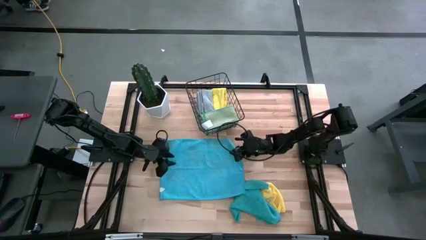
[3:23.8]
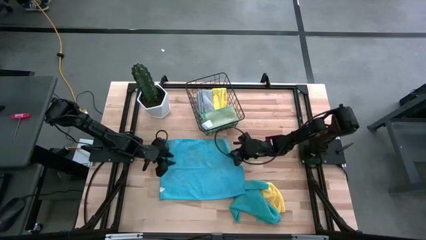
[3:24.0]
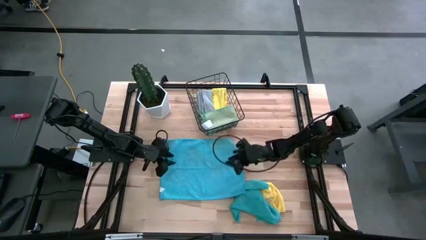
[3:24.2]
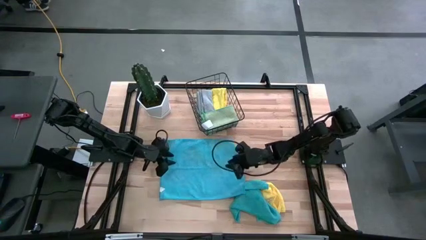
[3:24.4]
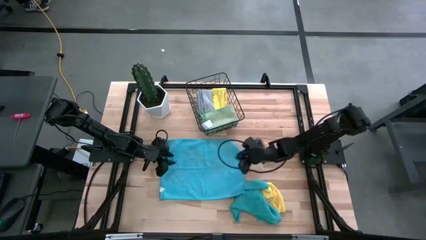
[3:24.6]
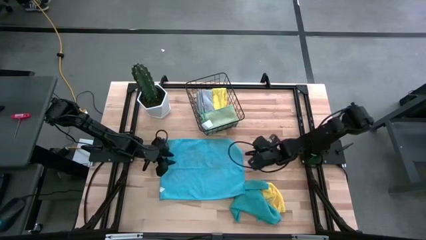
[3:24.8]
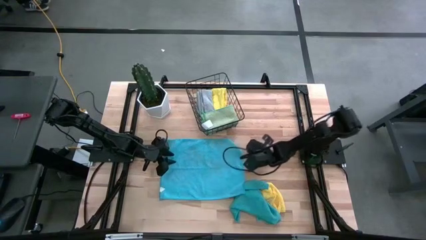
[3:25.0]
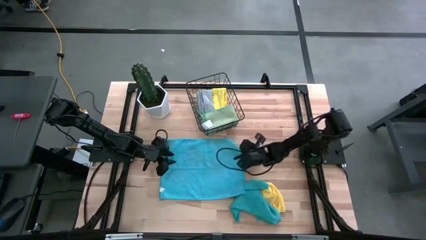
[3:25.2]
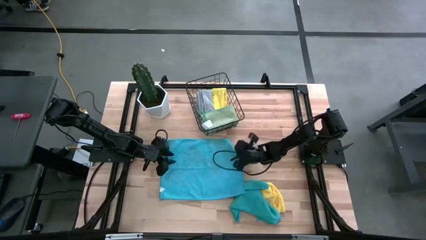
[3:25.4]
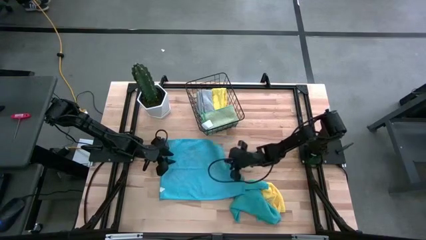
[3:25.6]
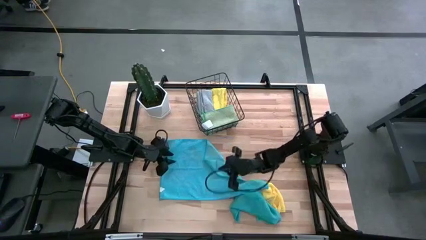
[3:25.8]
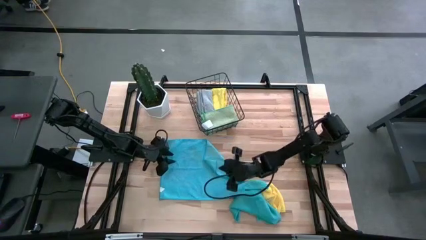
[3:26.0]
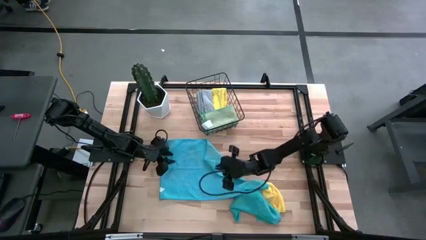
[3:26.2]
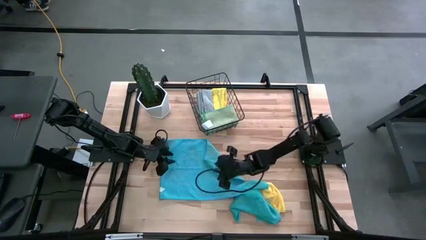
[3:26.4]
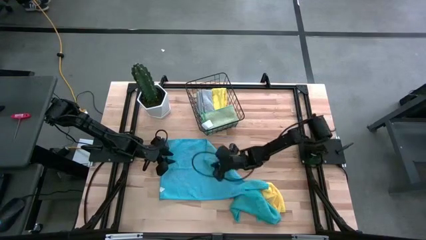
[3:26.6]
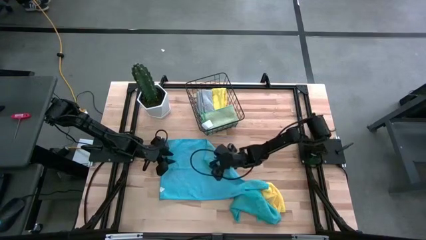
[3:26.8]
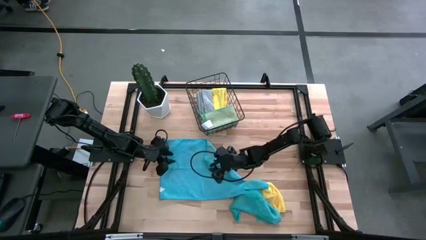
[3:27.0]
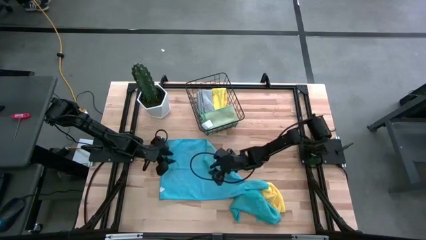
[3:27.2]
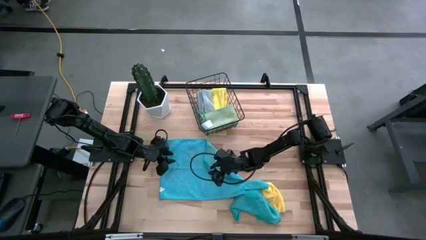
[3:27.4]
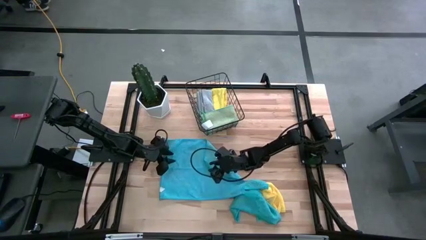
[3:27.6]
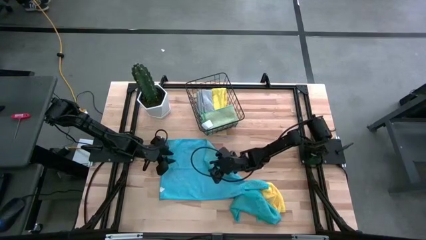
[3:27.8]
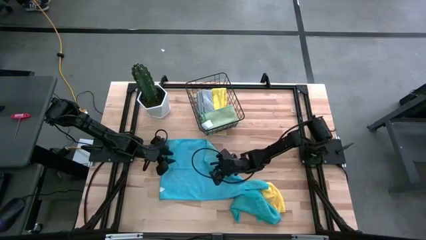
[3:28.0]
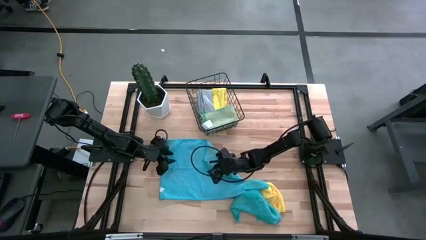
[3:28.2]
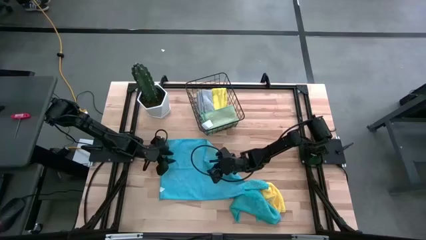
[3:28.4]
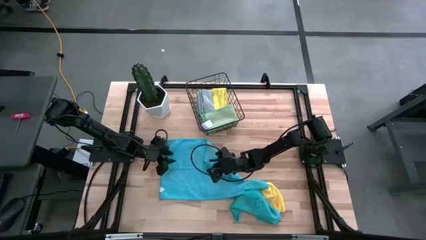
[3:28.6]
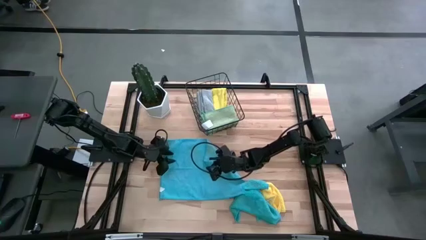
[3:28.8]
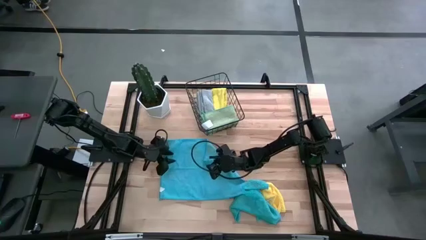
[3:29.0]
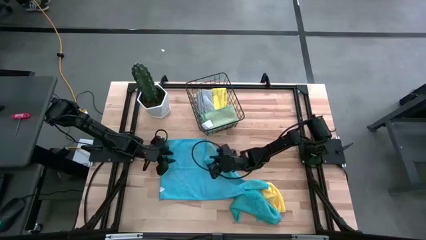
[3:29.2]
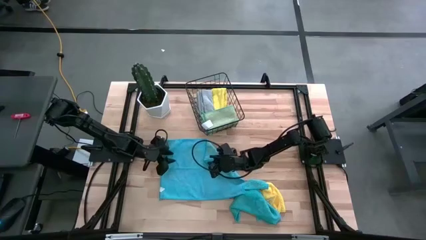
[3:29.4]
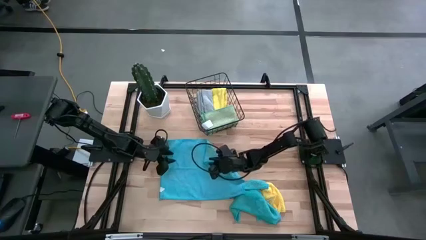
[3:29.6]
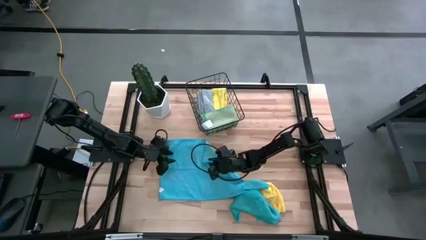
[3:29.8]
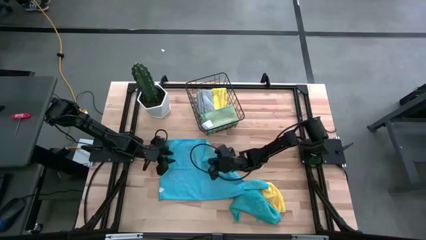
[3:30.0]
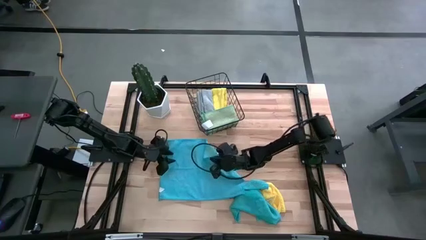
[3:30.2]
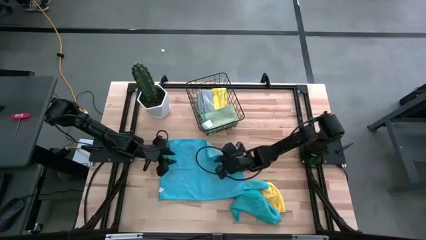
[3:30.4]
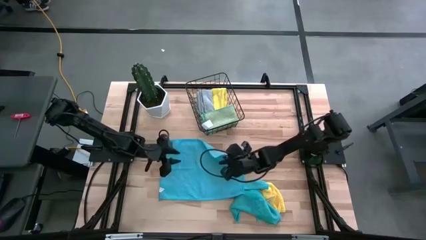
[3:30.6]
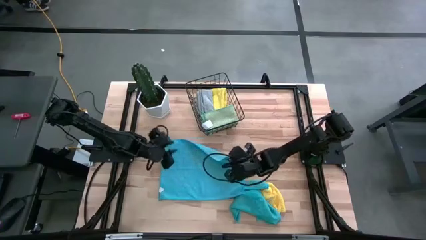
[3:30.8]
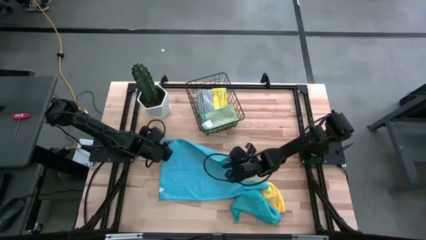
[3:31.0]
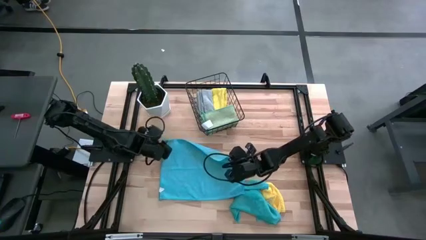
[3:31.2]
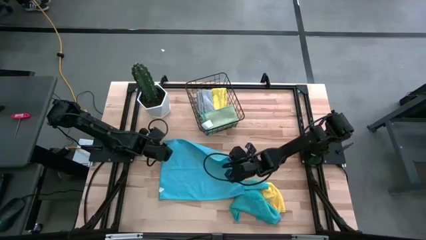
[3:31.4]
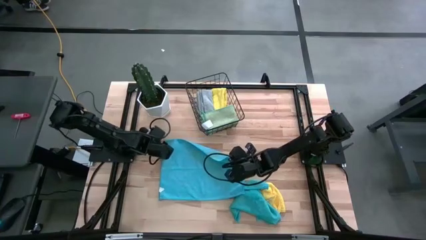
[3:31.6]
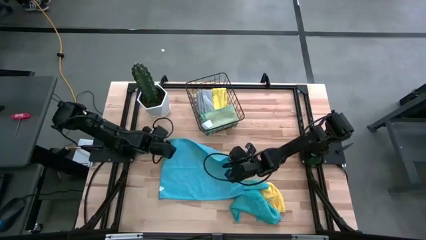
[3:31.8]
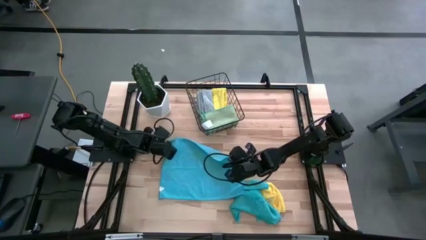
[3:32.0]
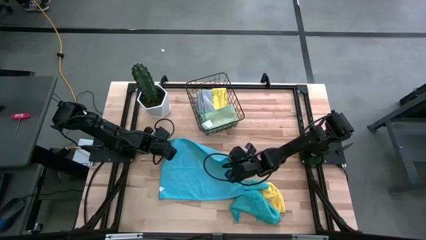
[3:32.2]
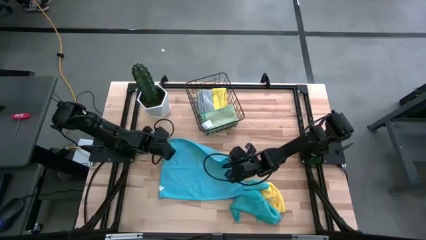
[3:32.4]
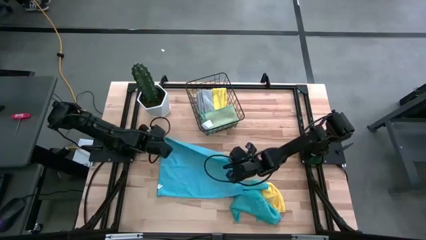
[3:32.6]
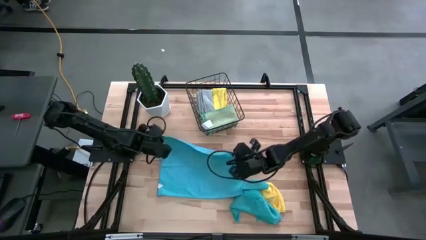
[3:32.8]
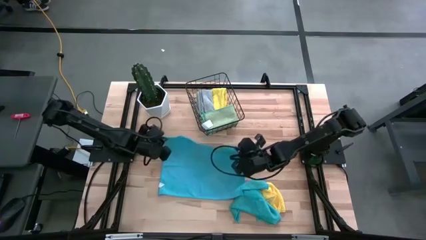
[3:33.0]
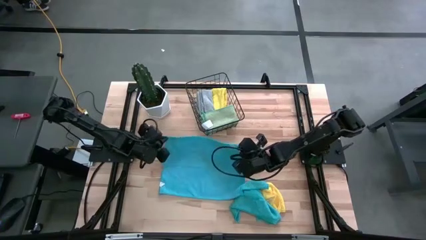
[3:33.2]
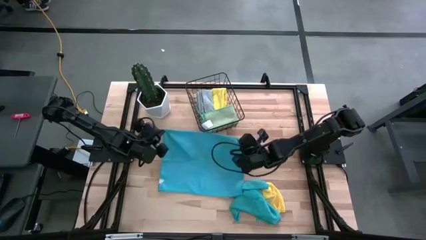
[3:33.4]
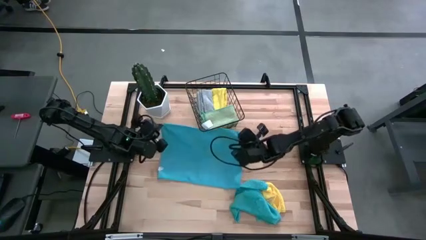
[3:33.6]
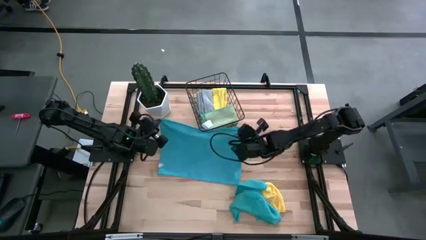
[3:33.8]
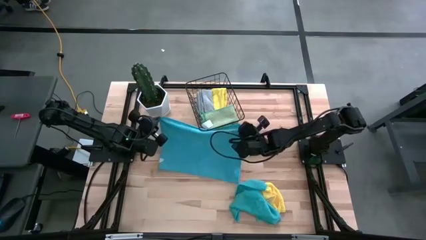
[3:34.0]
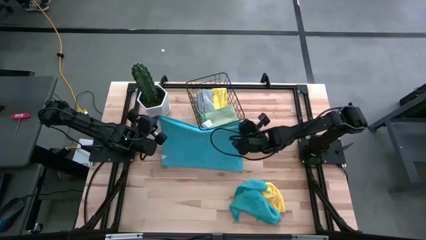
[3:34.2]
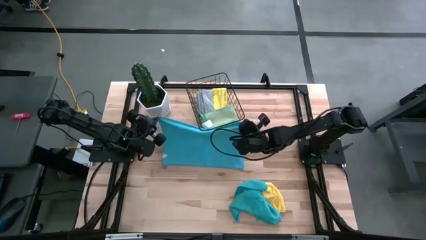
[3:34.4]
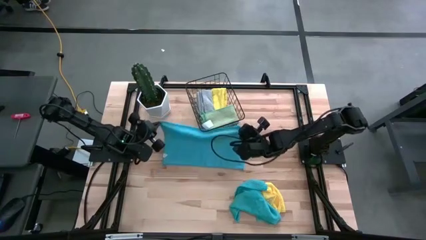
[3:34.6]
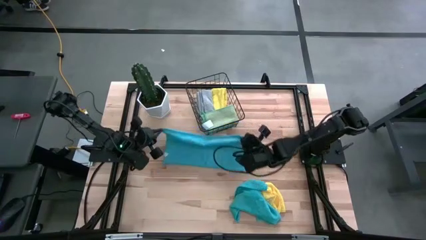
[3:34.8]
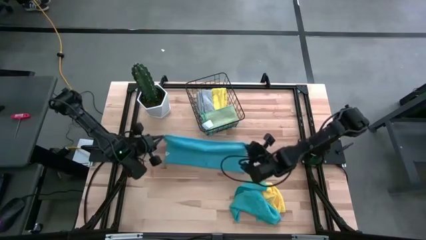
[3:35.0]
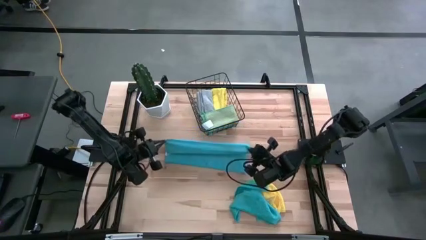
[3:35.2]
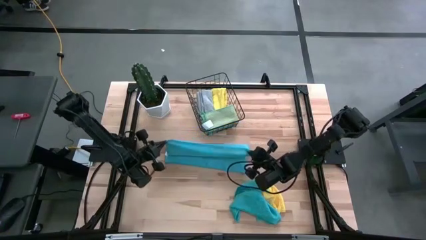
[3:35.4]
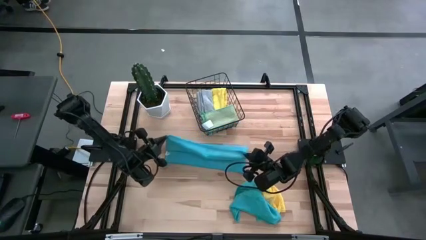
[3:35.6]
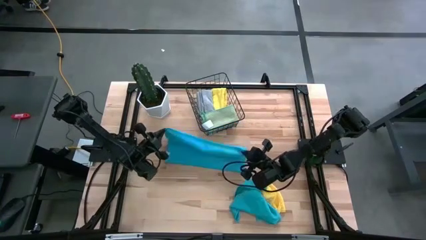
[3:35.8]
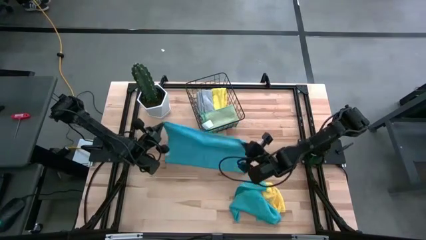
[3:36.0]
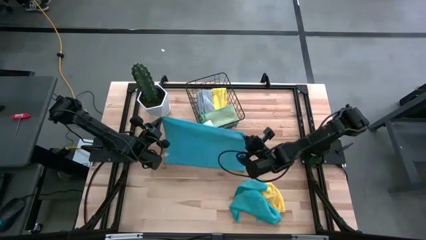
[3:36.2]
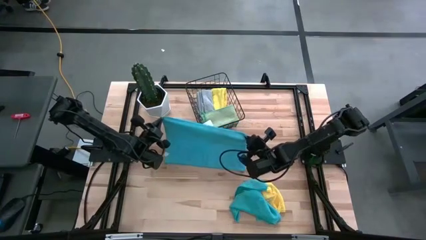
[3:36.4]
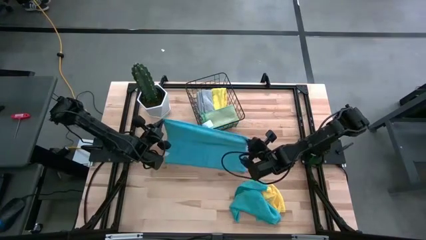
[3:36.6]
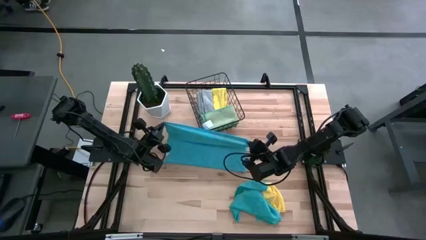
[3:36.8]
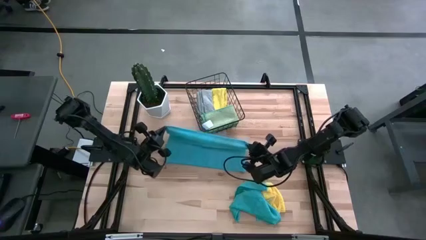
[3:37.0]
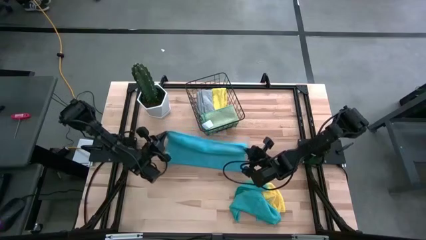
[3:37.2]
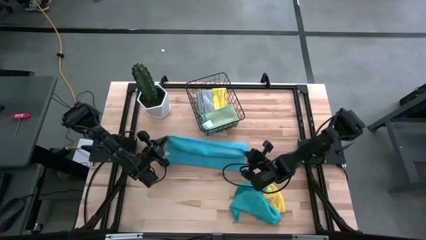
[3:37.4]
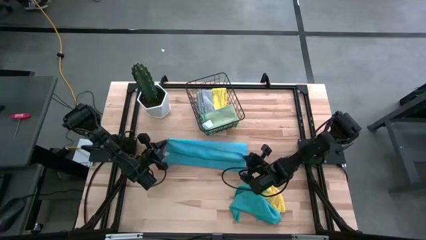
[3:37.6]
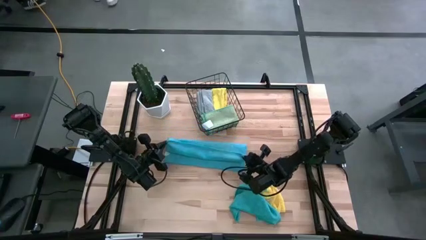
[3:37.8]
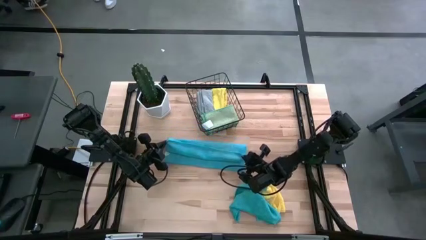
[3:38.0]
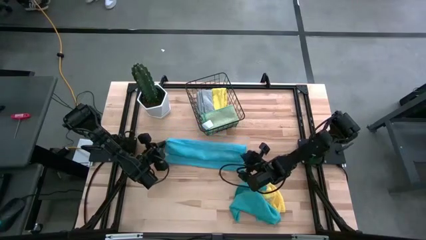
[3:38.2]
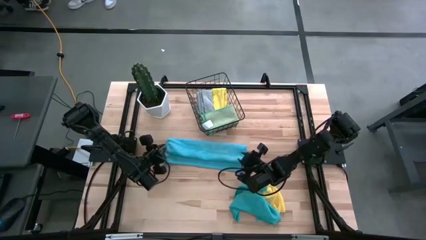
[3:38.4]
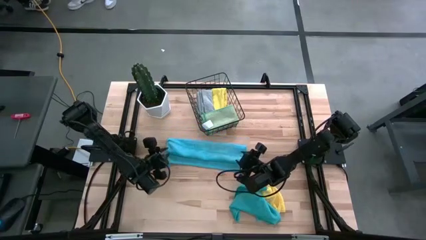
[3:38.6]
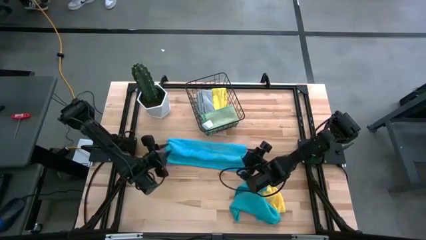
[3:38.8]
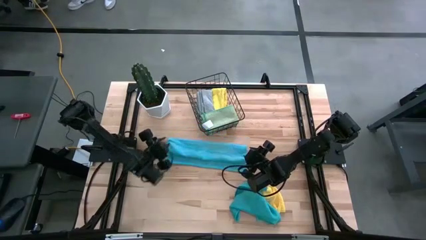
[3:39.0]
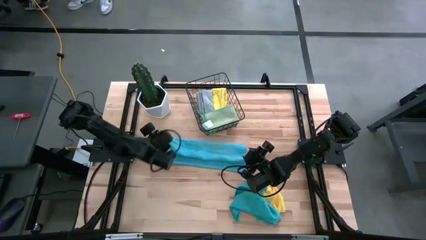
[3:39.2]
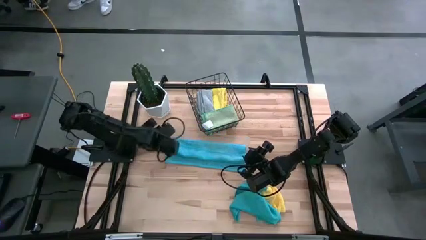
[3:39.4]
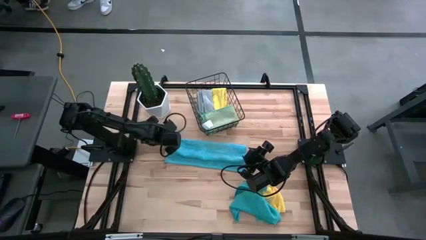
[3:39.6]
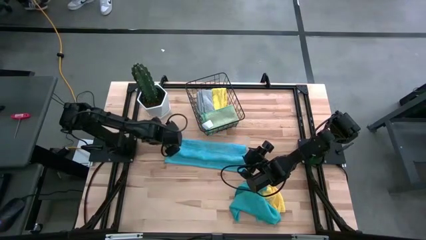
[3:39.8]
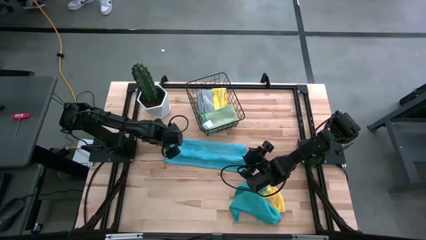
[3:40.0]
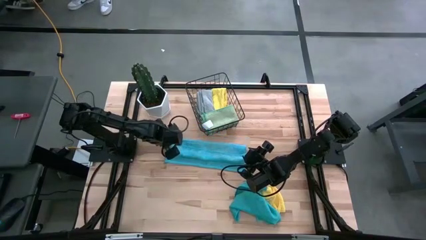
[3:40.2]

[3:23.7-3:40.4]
Task: Fold microfiber towels
Fold the left blue microfiber cloth

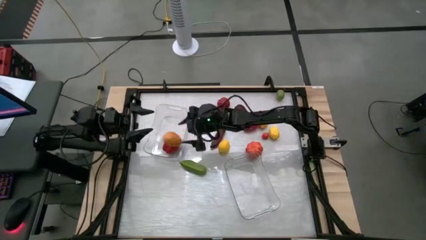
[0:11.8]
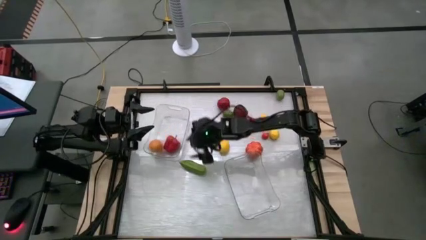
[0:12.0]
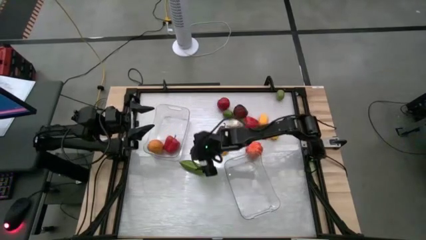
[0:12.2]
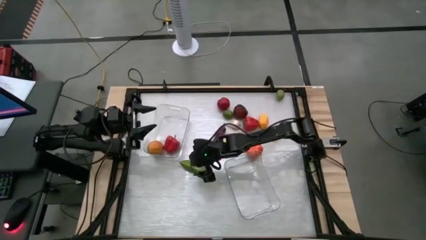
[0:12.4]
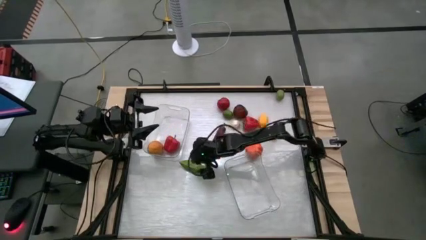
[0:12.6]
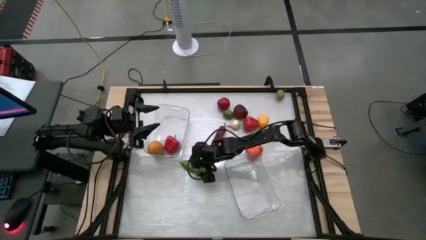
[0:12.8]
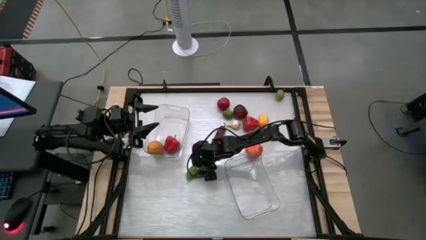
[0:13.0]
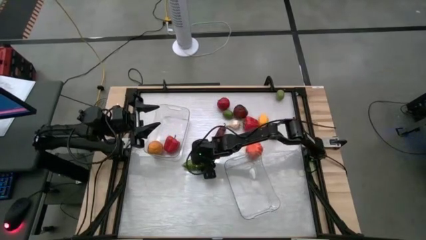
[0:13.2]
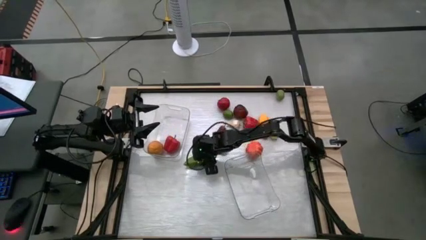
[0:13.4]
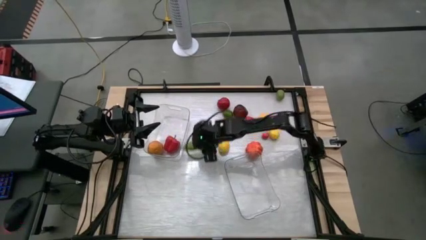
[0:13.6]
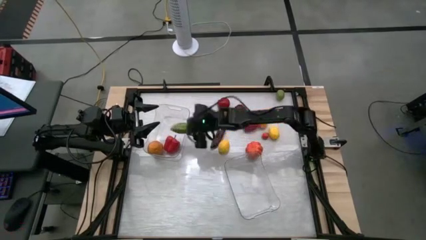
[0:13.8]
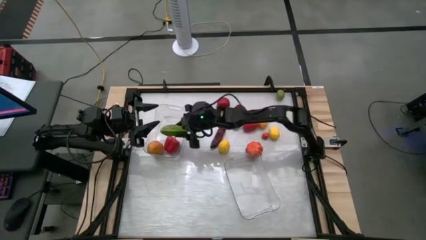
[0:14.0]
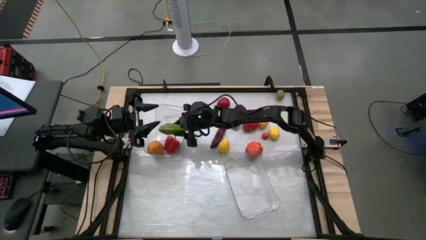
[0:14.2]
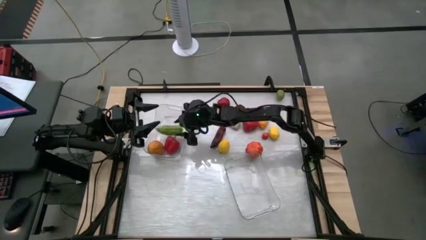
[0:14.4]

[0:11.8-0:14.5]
Task: Sort produce into baskets
Put the green cucumber into the left transparent bin
